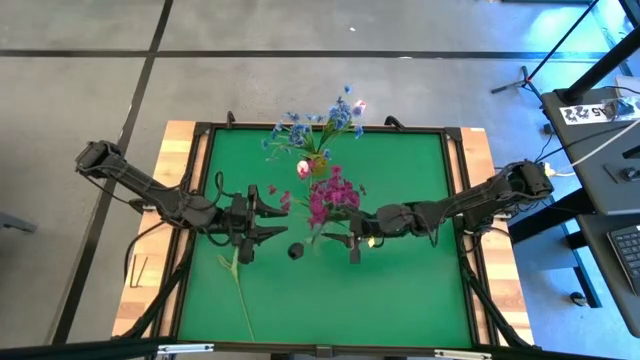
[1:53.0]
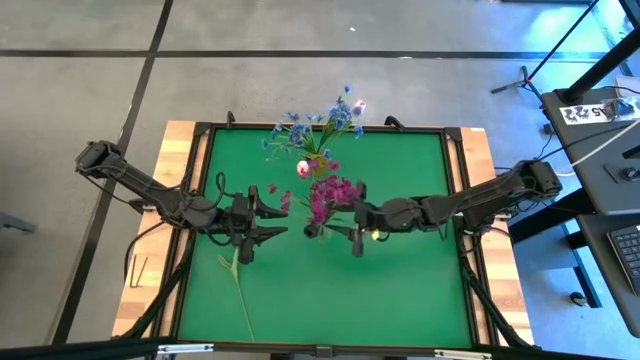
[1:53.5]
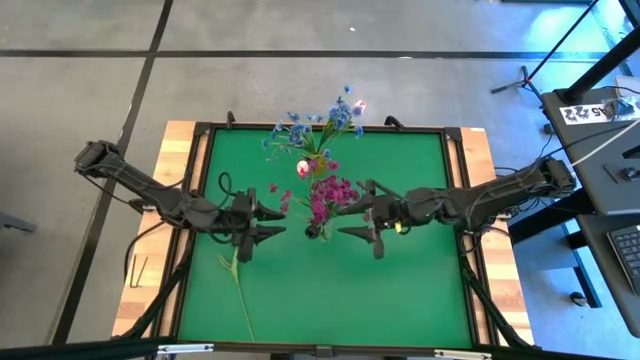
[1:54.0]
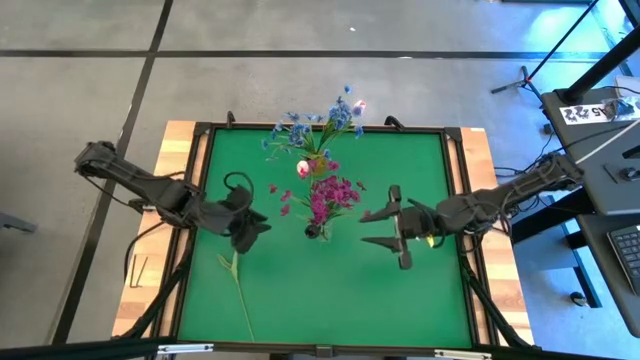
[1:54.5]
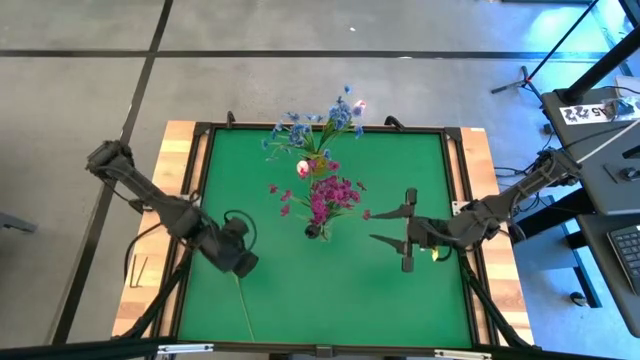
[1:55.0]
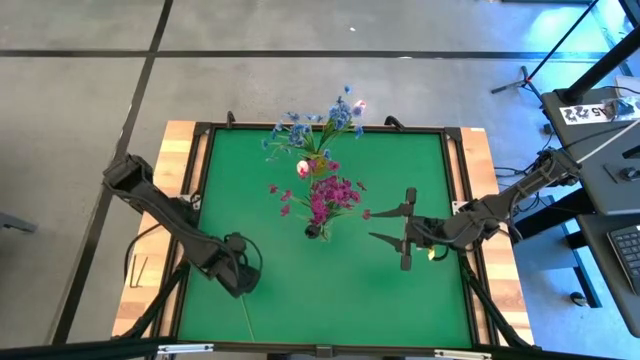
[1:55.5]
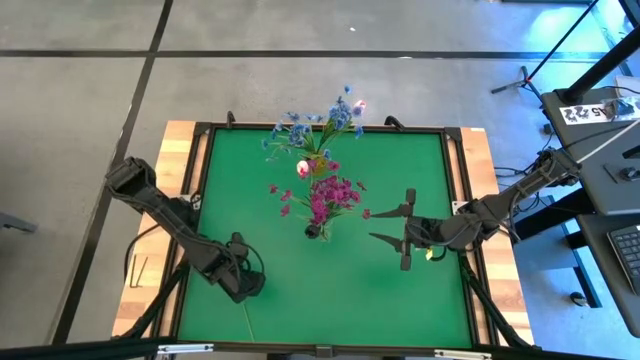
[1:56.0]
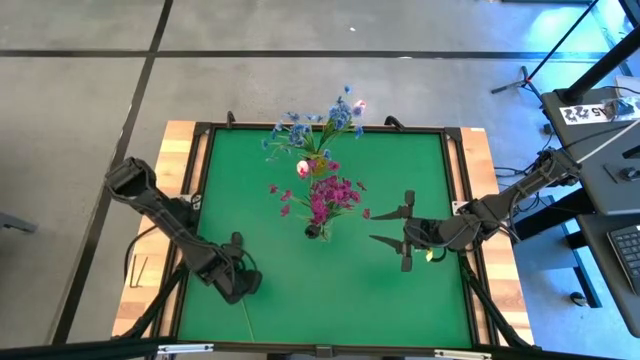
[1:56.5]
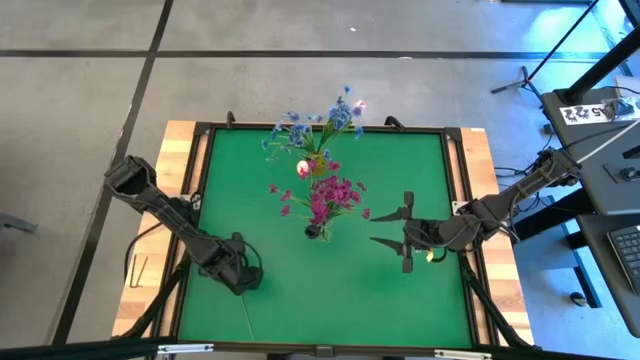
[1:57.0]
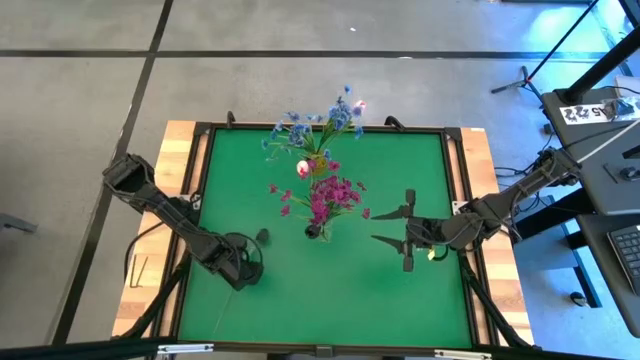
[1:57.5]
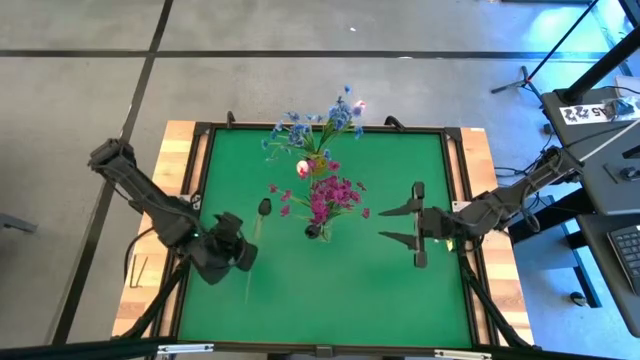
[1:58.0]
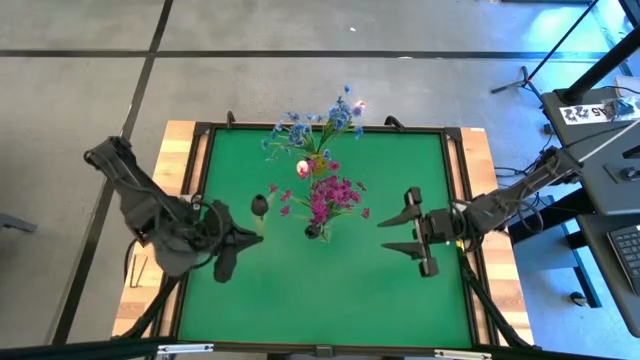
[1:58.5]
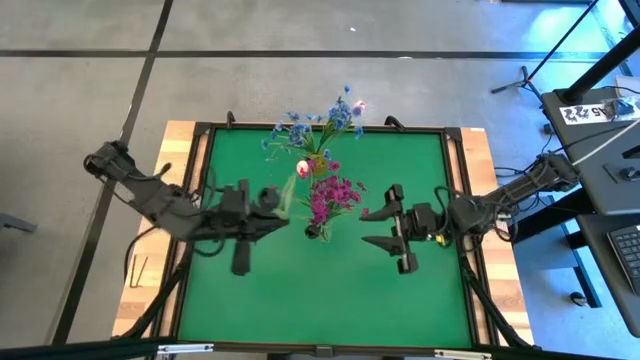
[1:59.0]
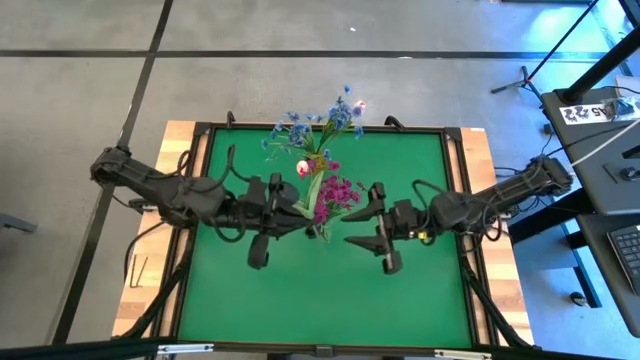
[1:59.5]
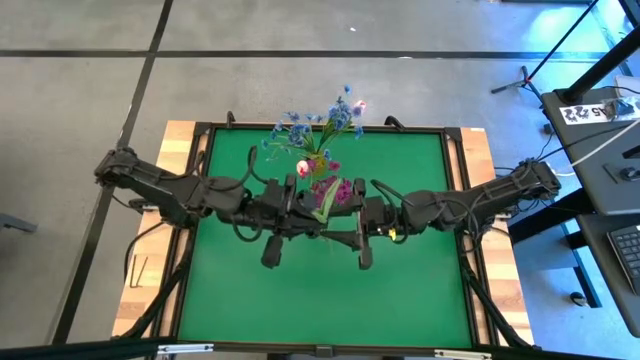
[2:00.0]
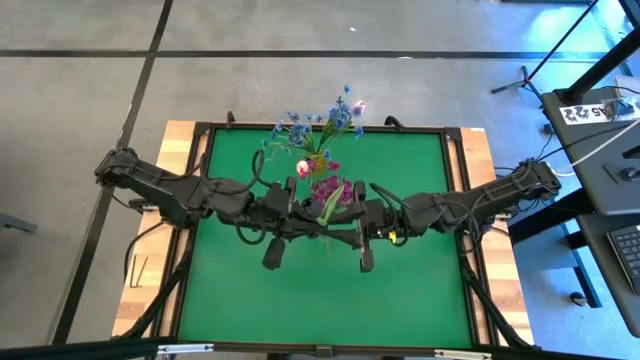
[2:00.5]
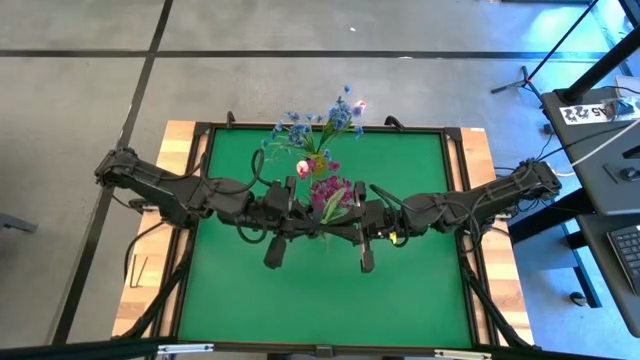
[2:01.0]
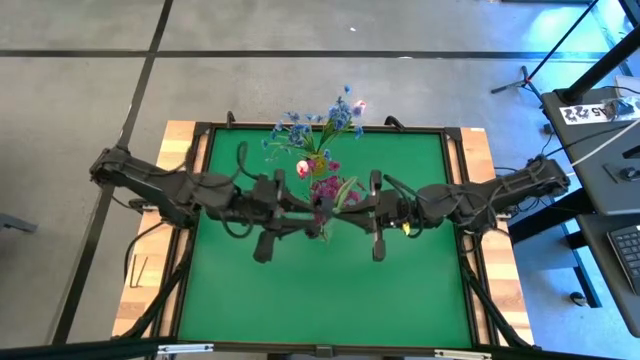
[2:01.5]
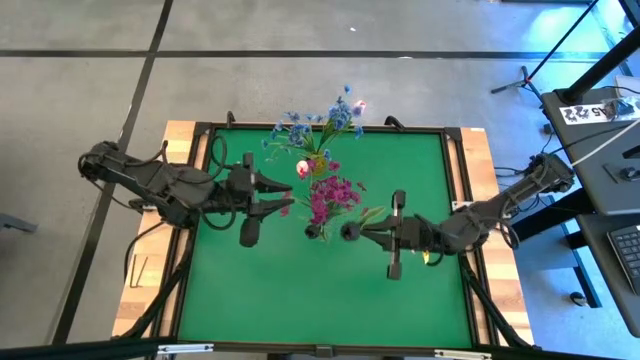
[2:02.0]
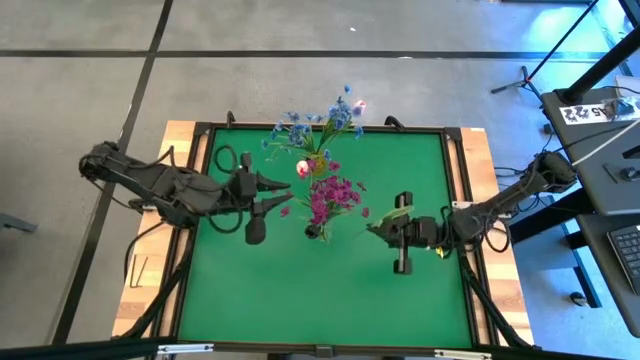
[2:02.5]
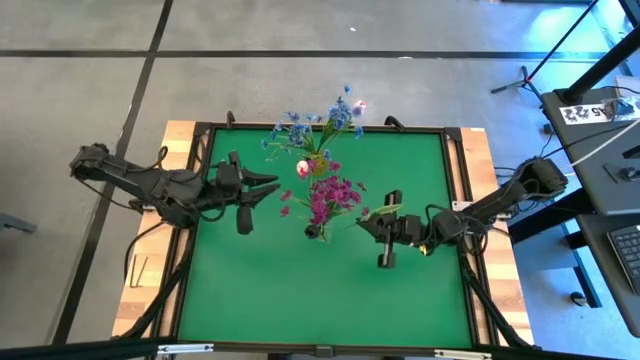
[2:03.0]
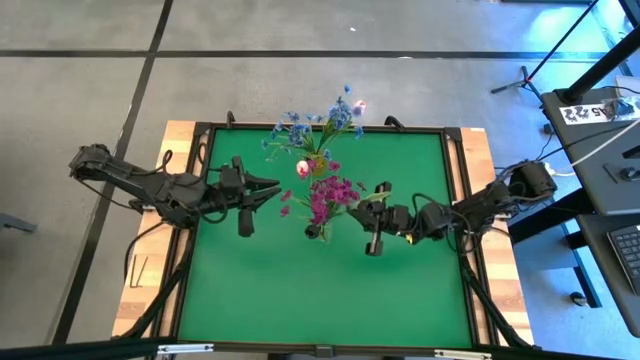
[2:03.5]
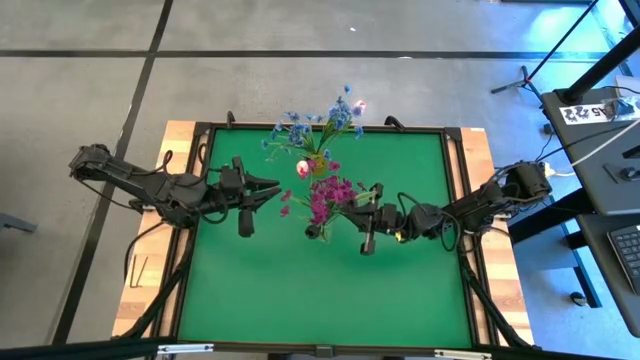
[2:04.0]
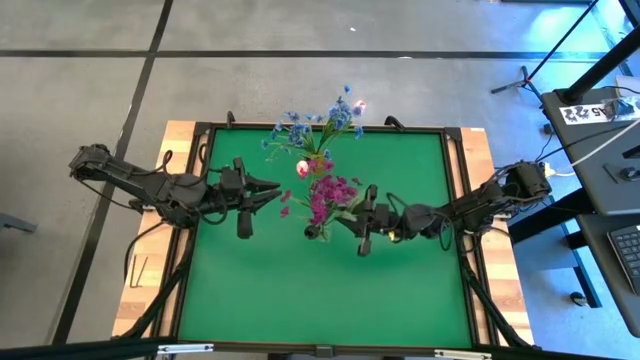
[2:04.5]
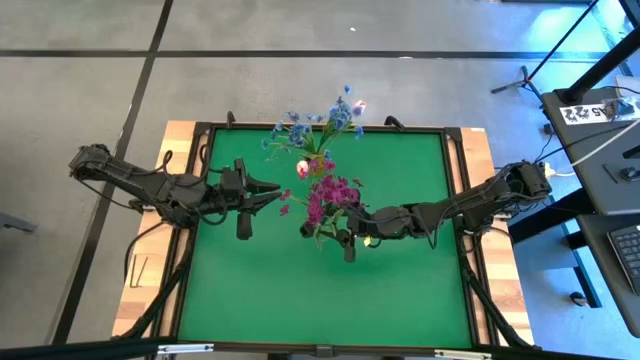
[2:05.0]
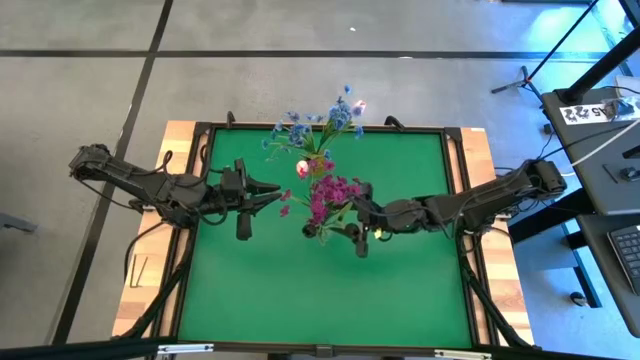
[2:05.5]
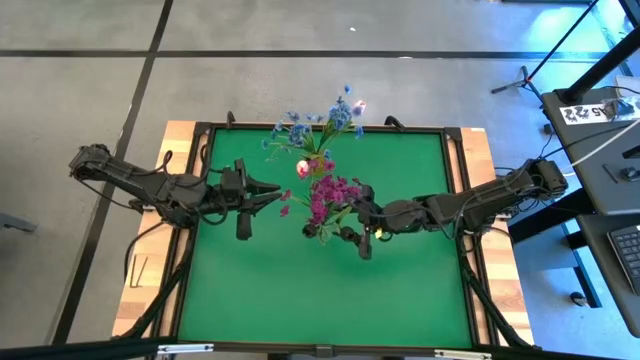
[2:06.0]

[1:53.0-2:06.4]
Task: Sort flowers into vase by color
Put the black flower into the transparent vase

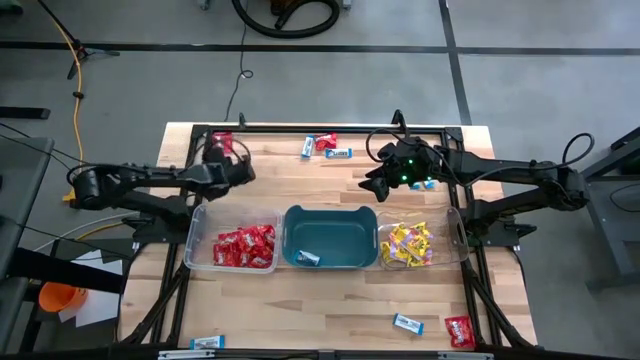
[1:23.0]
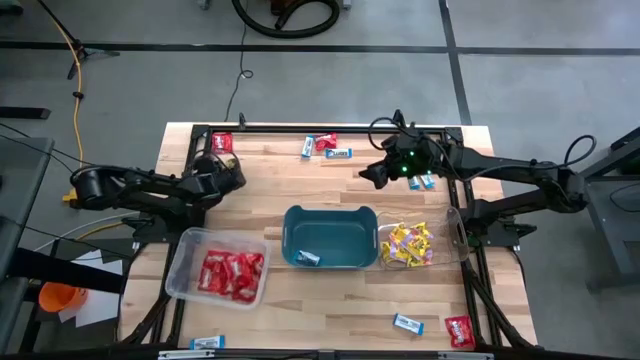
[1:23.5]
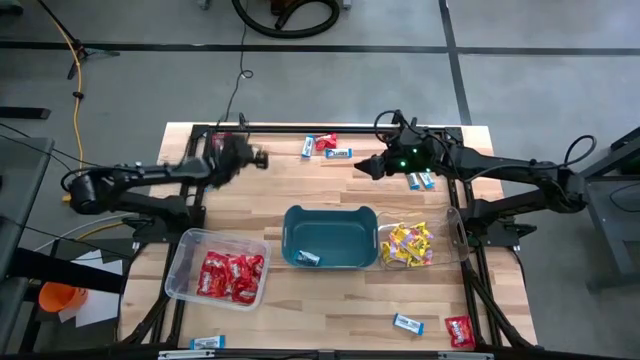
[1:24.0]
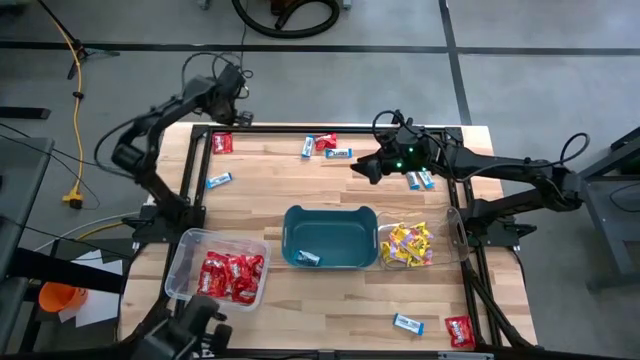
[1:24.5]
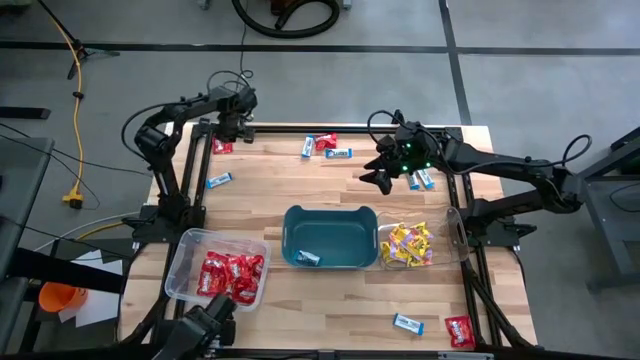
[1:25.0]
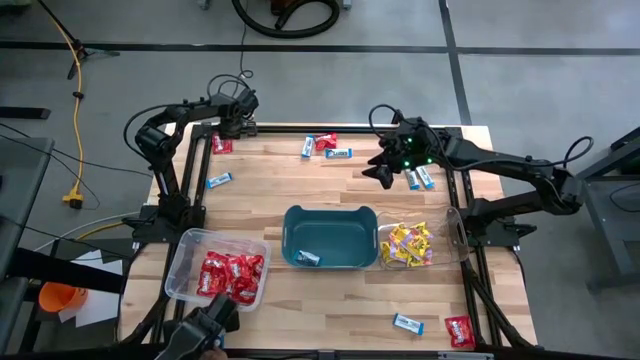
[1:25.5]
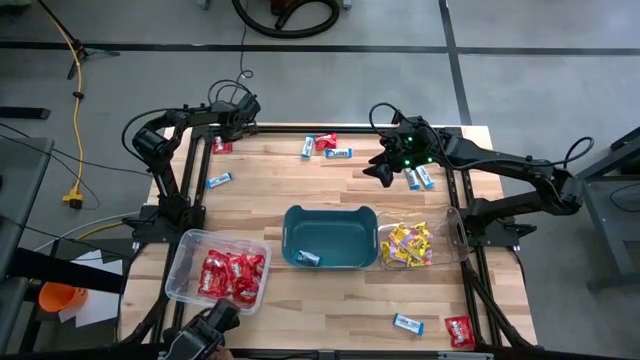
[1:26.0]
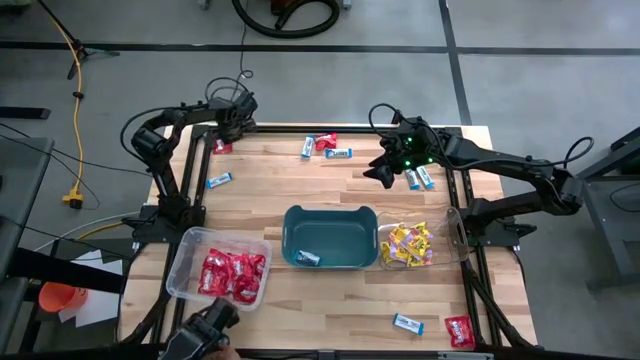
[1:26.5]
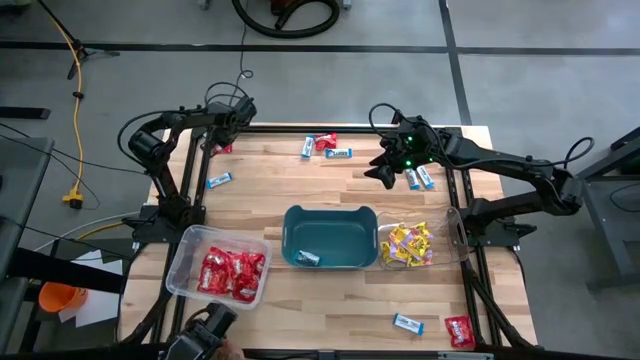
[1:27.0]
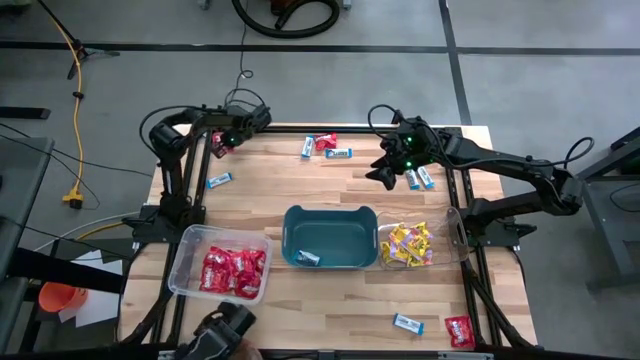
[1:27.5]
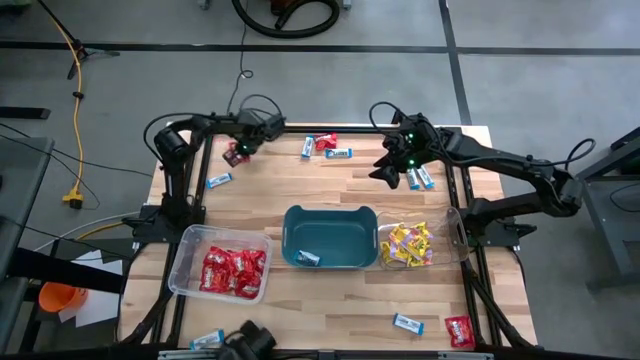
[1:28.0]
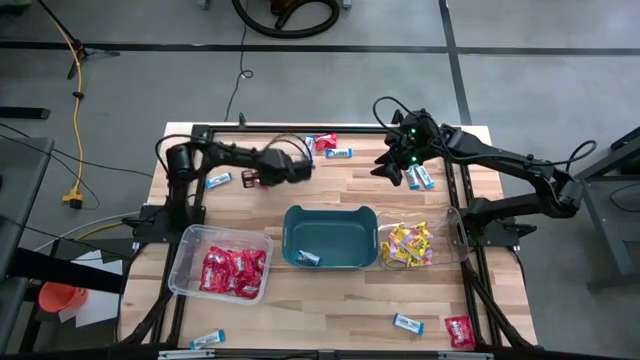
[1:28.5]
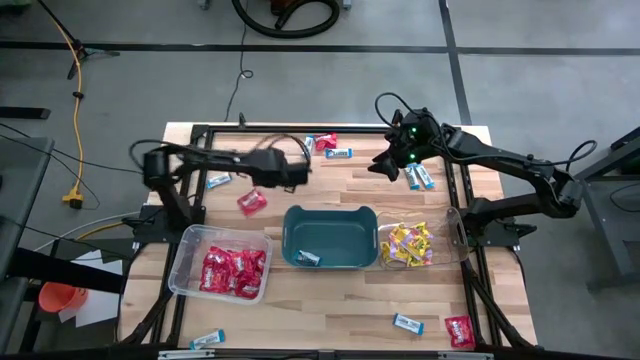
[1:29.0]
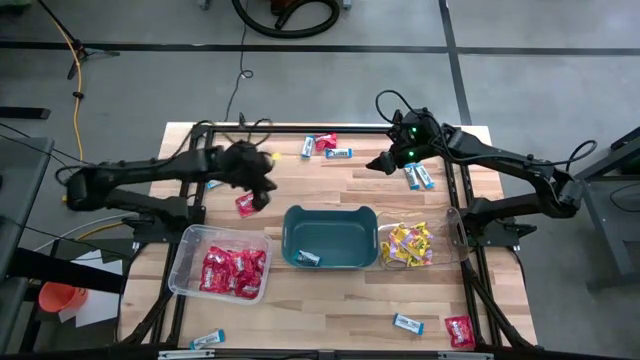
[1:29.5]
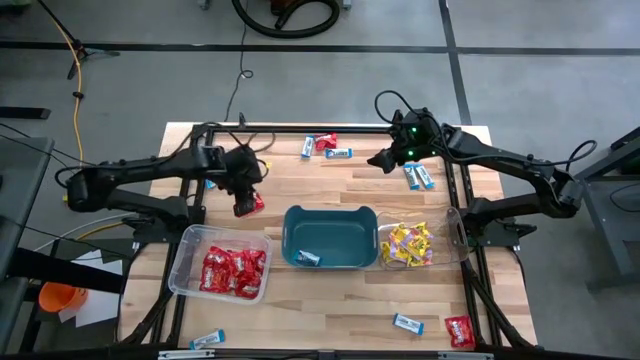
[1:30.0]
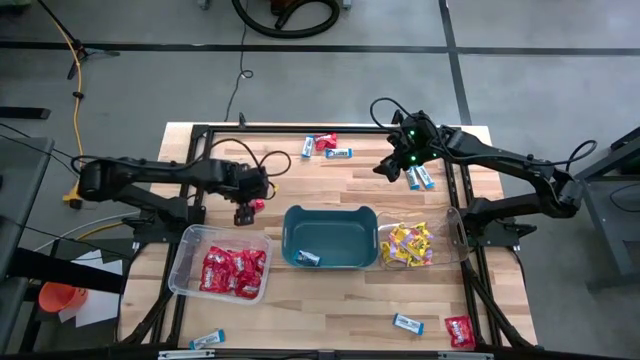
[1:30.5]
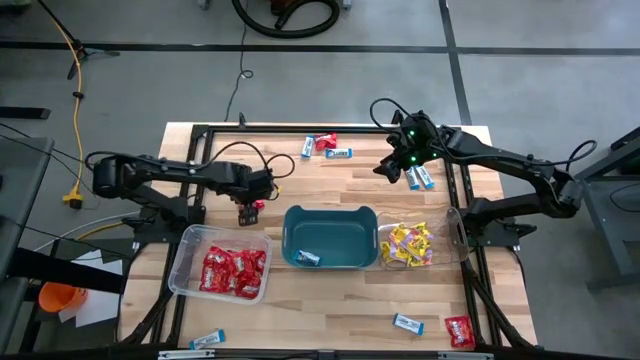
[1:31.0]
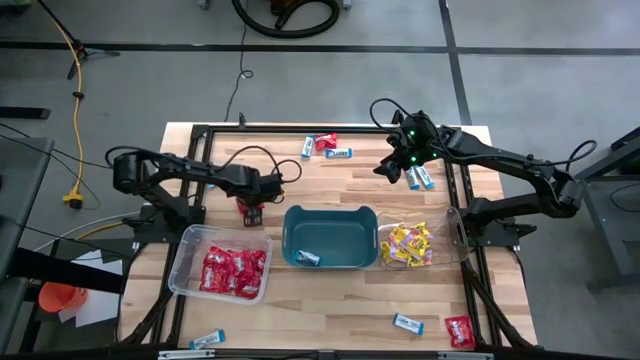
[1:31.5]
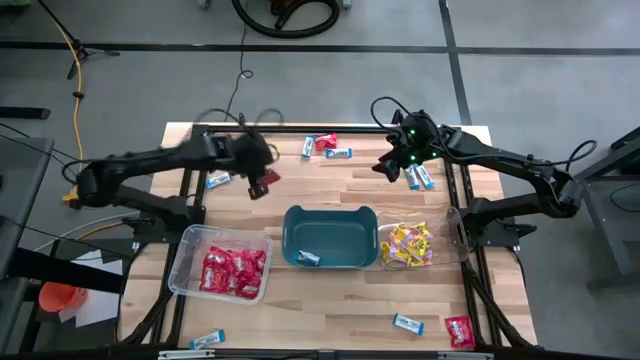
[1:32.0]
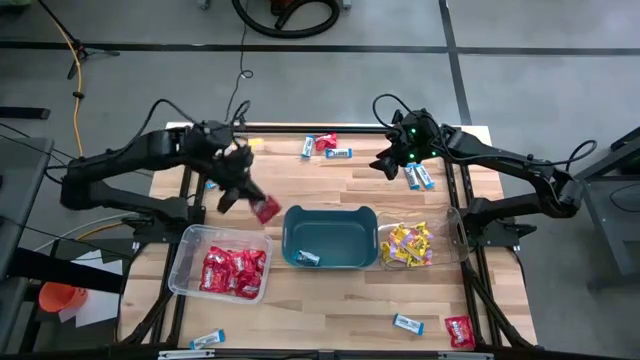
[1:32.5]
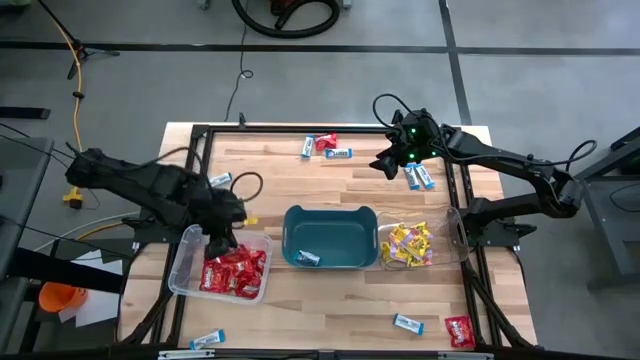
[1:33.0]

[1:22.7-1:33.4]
Task: Sort candy
Put the red candy into the left transparent bin
